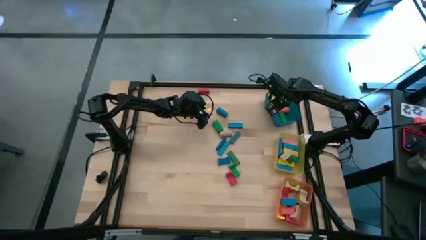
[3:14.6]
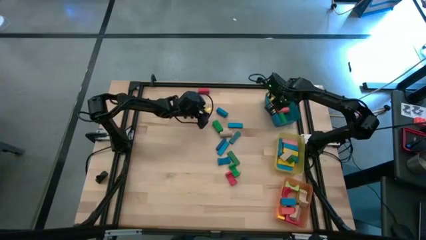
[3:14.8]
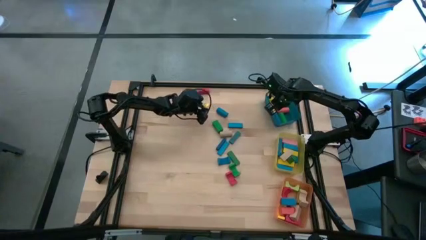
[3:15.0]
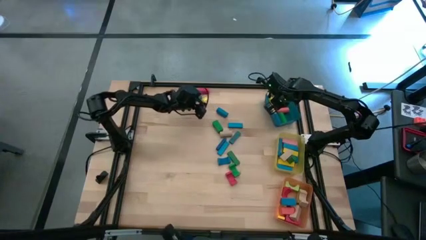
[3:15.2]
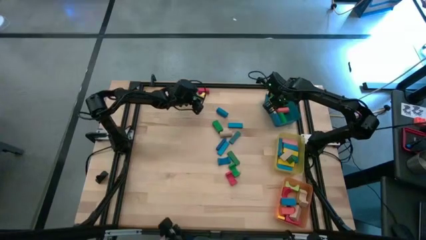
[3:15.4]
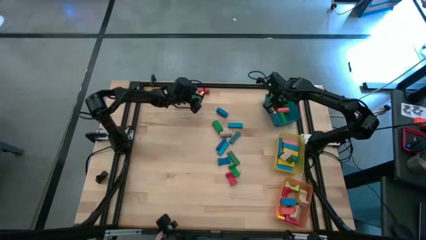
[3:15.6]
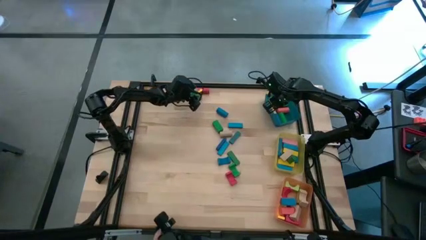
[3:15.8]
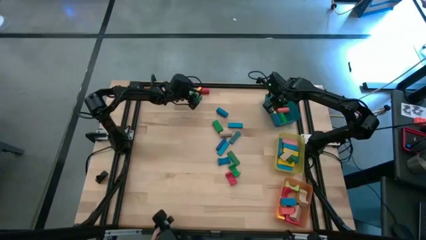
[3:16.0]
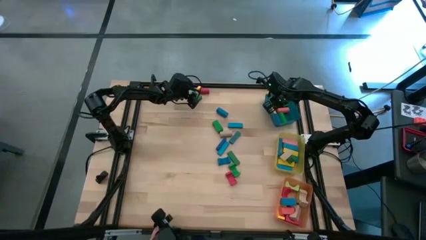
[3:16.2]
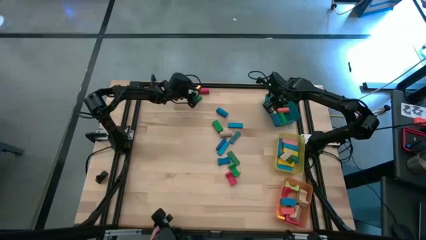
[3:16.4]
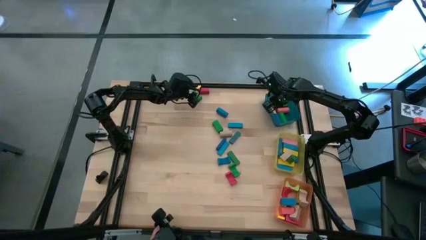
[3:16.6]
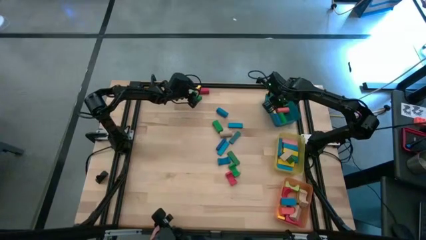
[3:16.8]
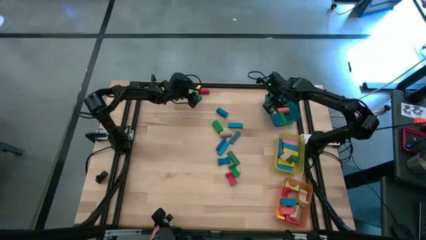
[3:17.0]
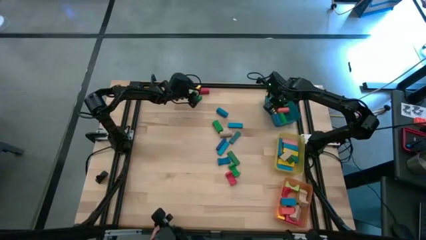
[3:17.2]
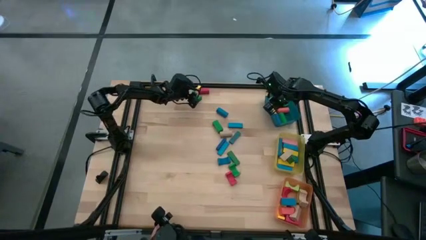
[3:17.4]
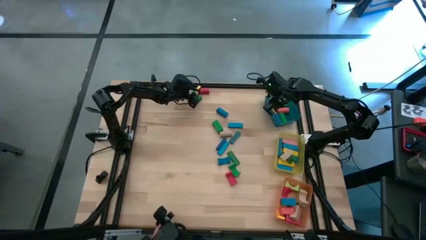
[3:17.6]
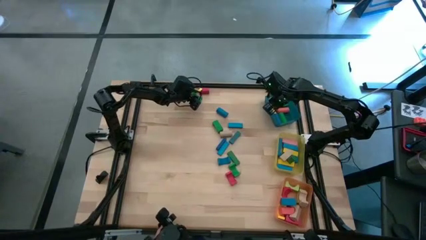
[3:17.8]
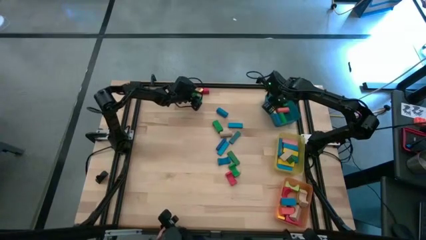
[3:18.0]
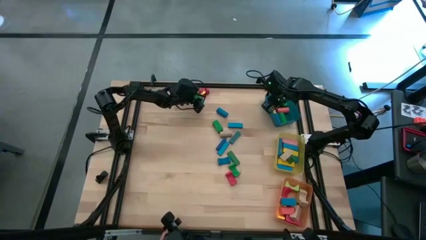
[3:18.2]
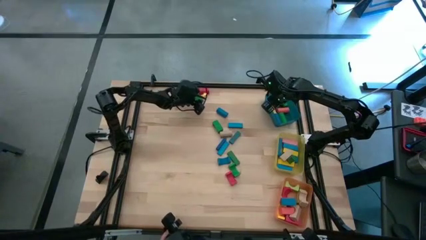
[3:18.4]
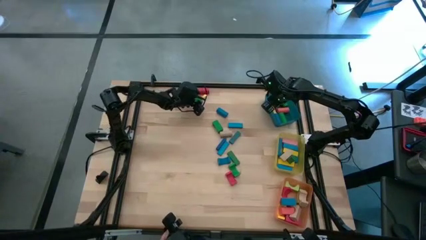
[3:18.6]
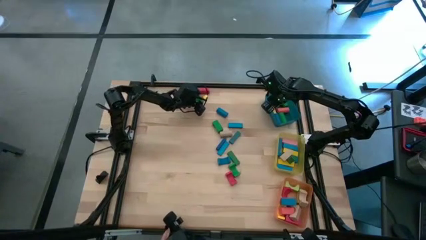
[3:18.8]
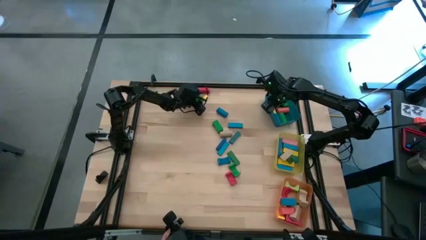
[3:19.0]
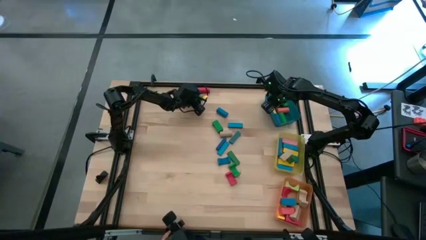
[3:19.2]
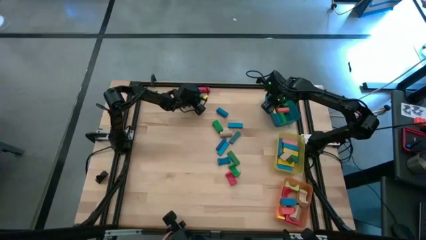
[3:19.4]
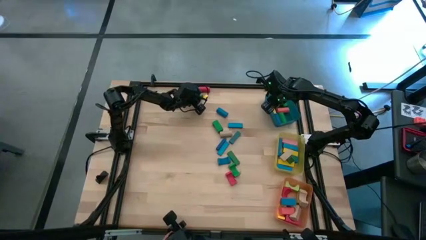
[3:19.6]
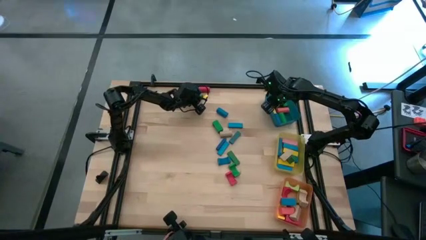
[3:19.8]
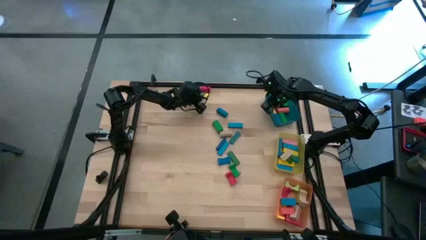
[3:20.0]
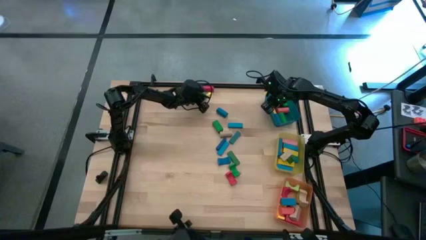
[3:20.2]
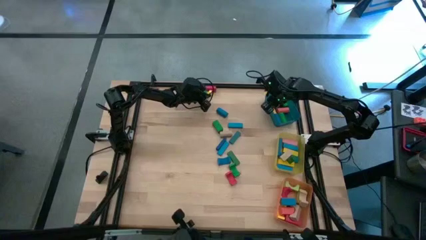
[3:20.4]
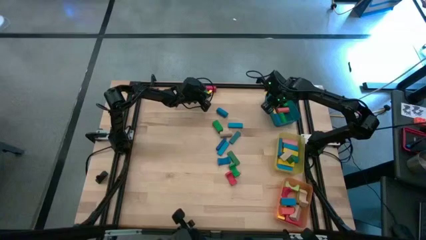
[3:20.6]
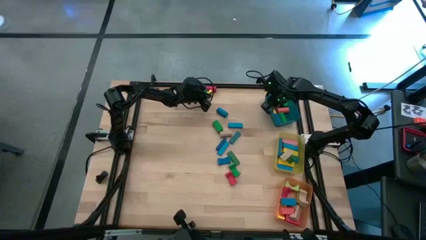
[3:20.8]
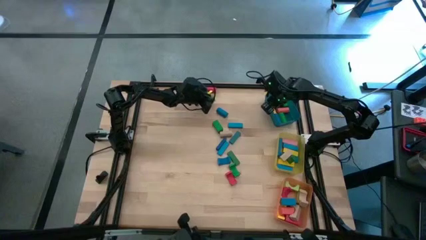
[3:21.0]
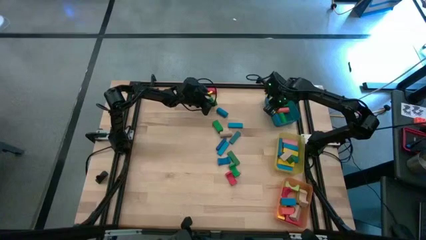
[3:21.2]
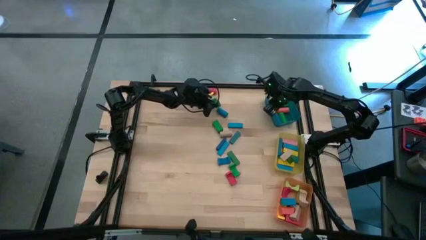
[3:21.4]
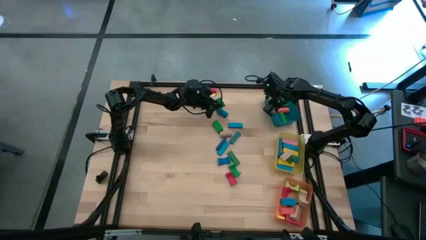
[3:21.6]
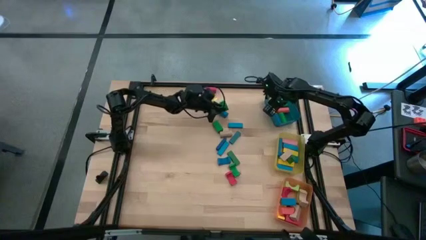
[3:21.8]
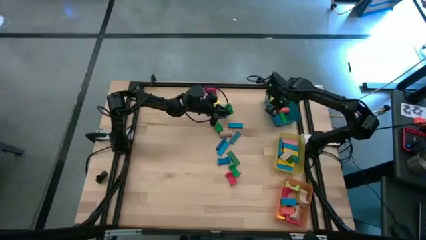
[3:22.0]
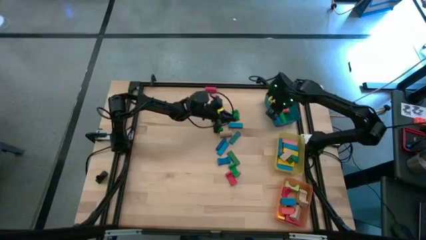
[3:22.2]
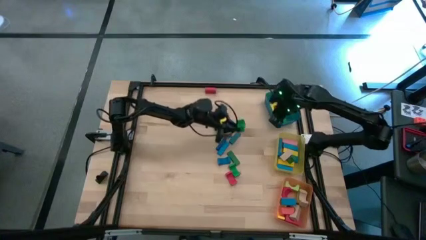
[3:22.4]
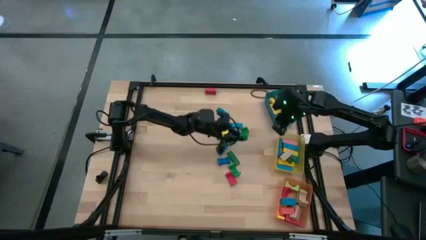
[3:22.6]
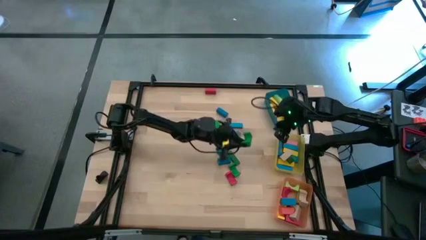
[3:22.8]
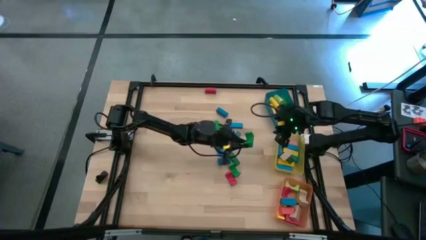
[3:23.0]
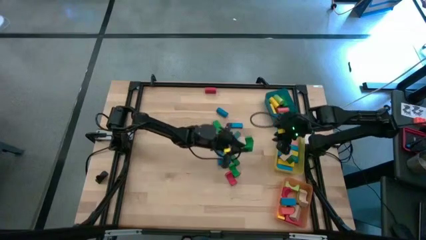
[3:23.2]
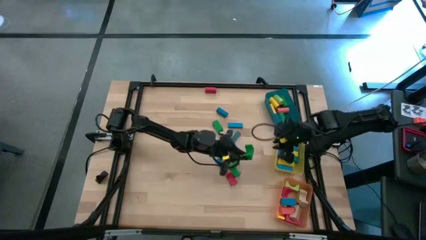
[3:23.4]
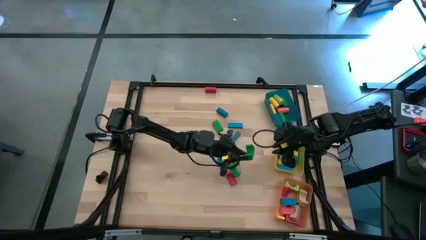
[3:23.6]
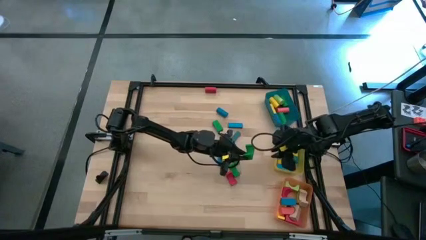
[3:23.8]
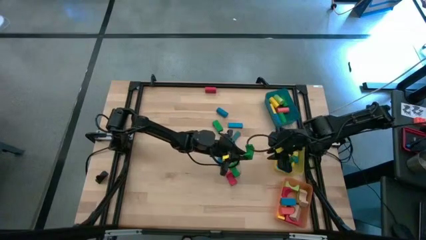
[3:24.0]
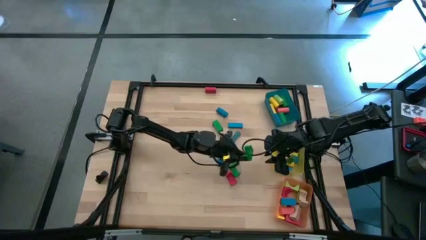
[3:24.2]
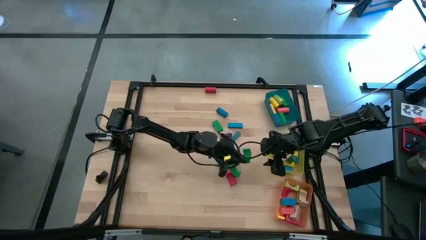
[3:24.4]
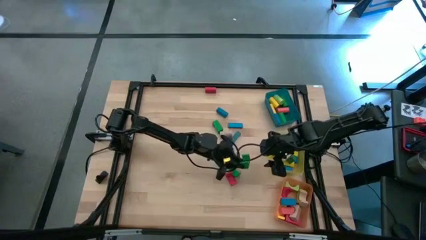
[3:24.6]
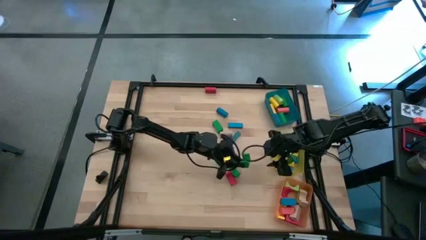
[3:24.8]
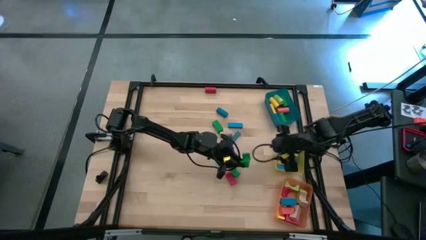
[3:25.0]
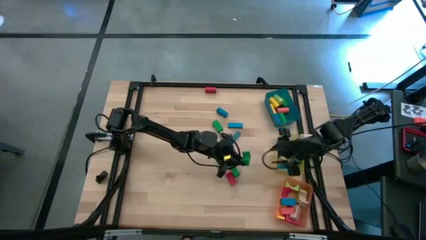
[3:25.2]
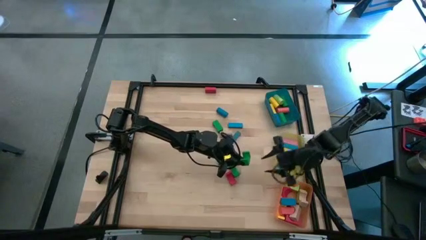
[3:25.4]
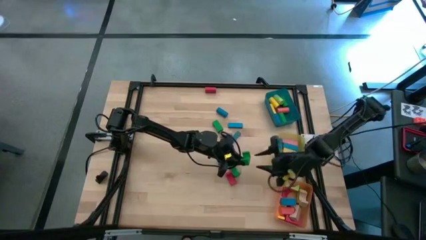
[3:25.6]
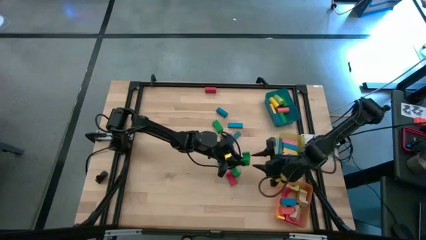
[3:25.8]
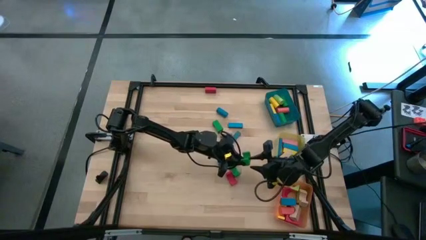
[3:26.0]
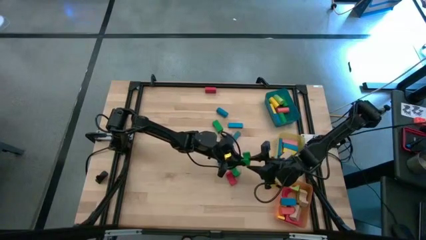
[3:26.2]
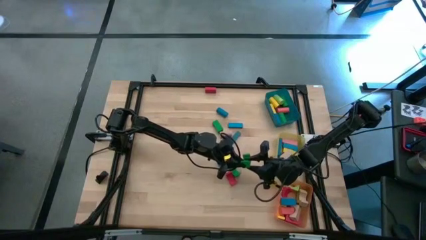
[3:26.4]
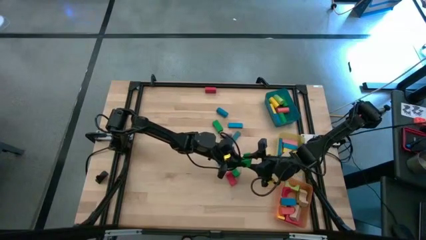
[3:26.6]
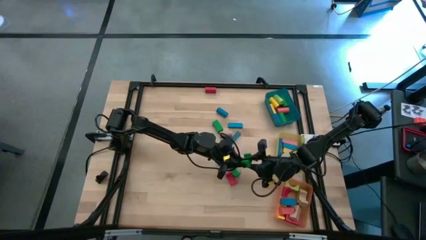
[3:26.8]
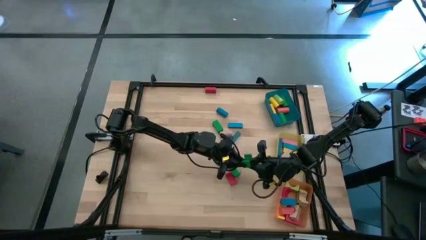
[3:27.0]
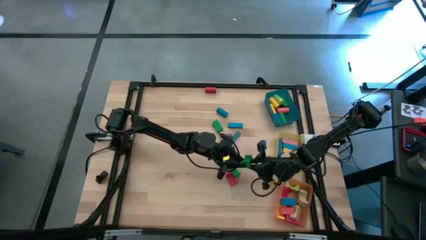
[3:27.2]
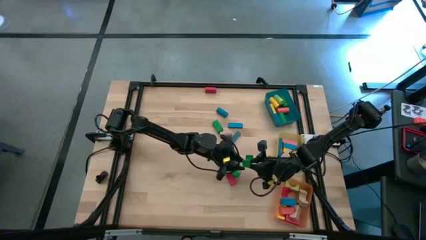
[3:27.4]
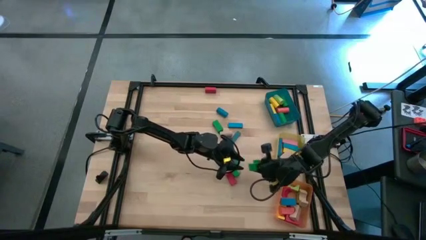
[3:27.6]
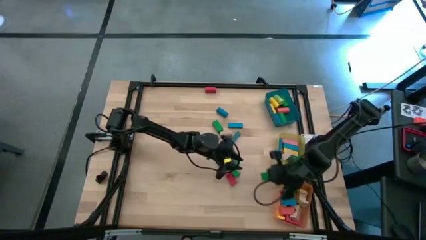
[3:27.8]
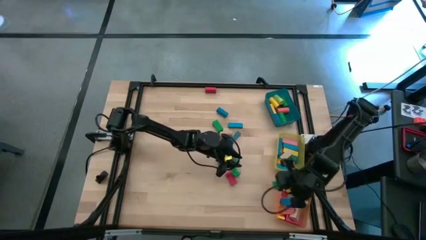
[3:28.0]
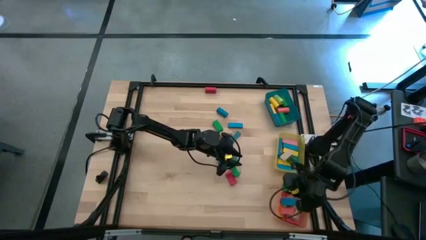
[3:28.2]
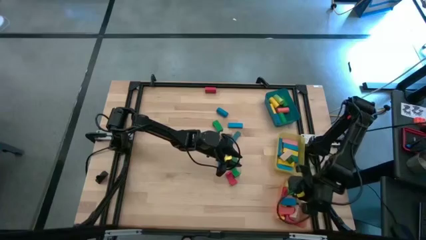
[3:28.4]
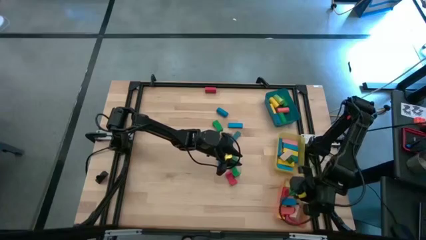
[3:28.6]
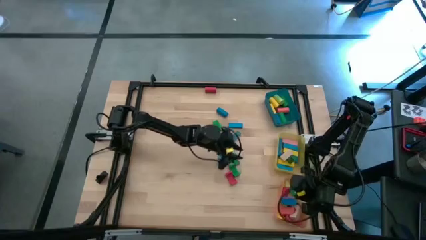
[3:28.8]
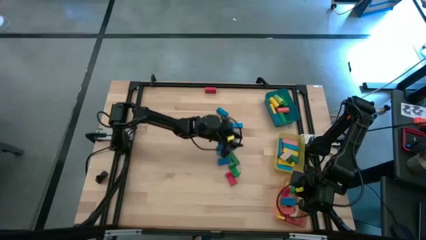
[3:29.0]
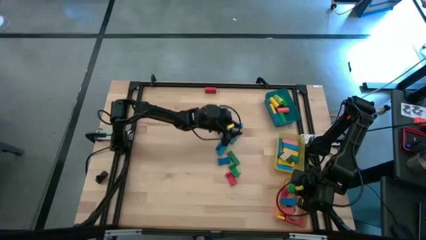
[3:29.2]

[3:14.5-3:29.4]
Task: Sort blocks by size
Put the green arch block into the orange bin
